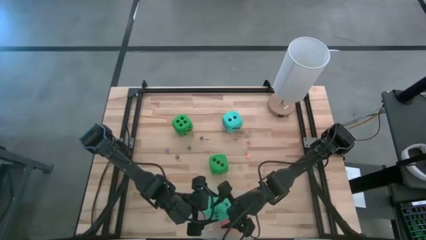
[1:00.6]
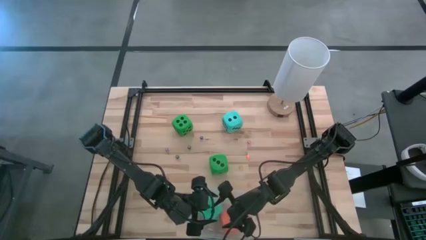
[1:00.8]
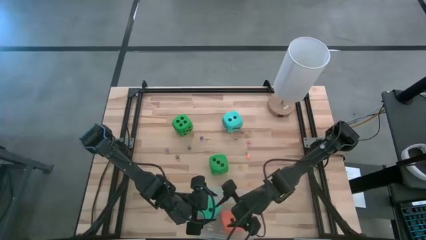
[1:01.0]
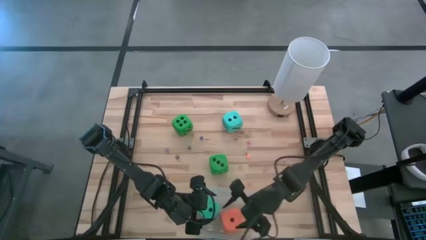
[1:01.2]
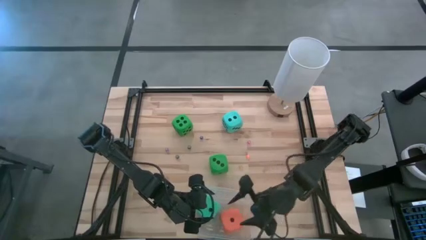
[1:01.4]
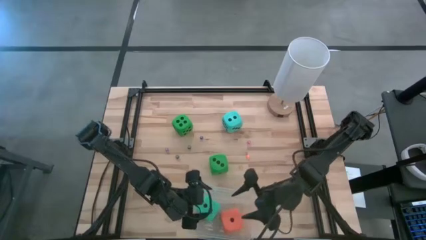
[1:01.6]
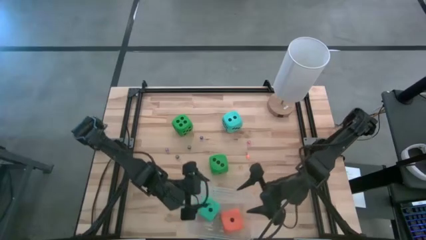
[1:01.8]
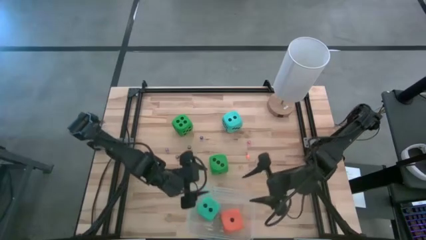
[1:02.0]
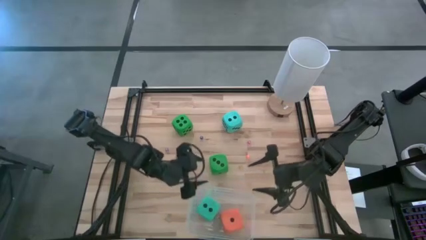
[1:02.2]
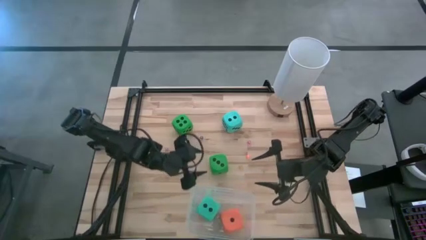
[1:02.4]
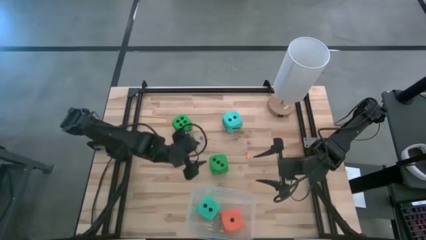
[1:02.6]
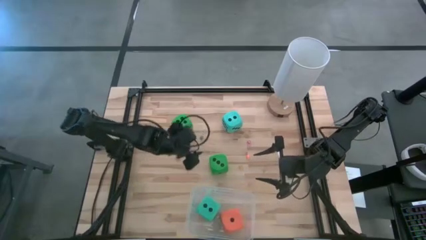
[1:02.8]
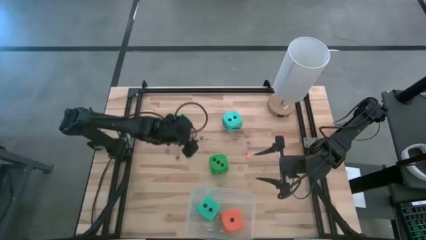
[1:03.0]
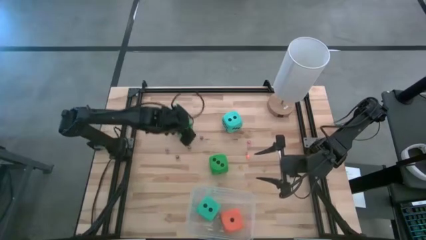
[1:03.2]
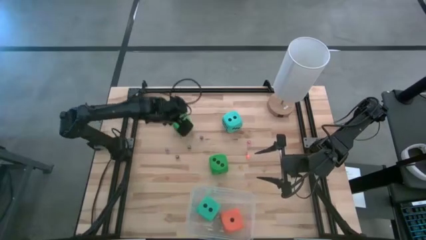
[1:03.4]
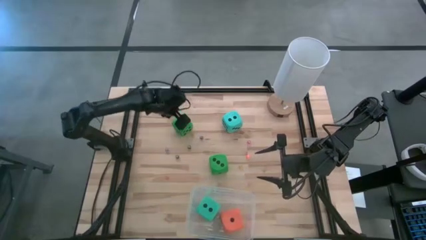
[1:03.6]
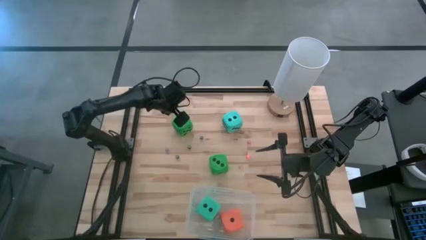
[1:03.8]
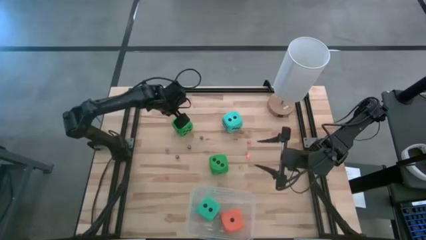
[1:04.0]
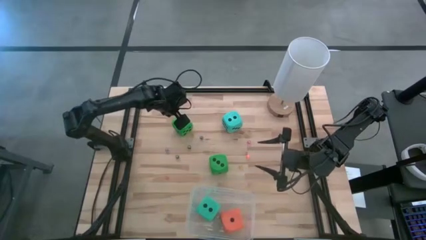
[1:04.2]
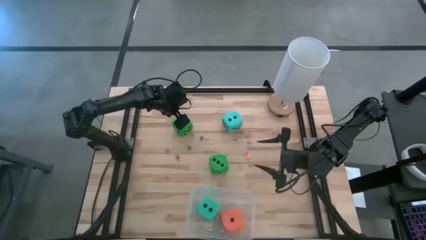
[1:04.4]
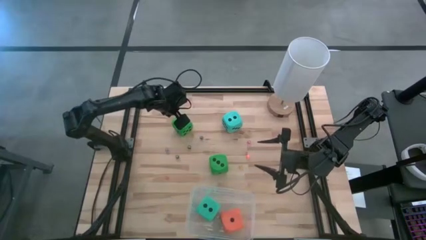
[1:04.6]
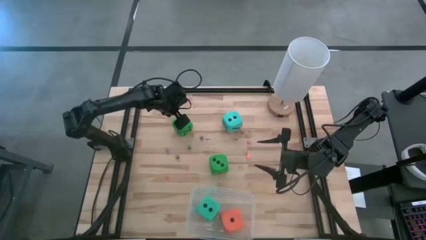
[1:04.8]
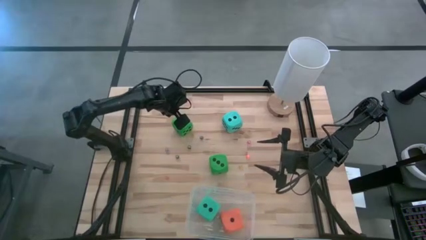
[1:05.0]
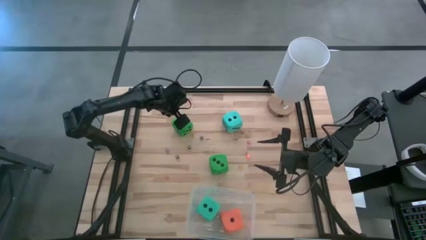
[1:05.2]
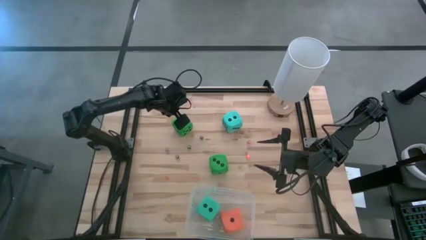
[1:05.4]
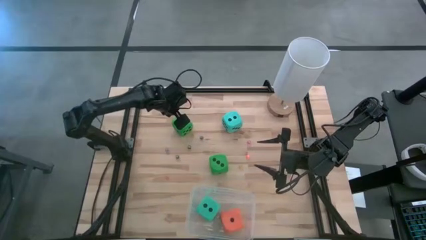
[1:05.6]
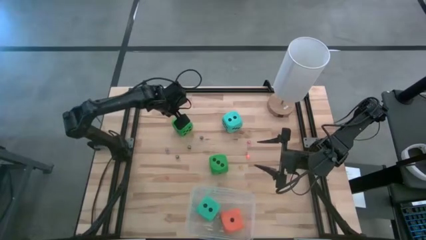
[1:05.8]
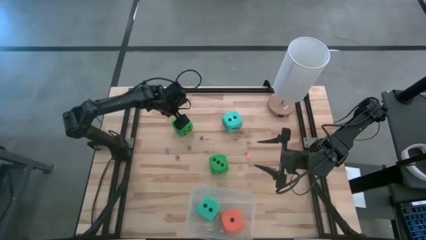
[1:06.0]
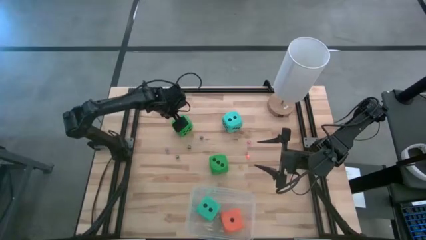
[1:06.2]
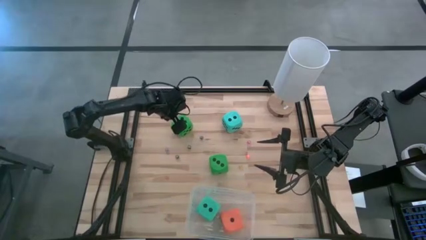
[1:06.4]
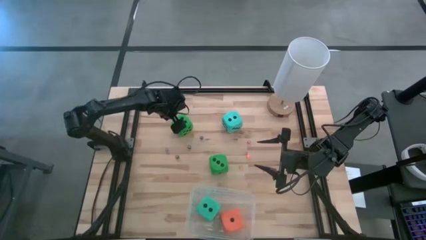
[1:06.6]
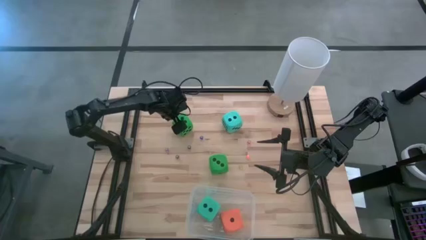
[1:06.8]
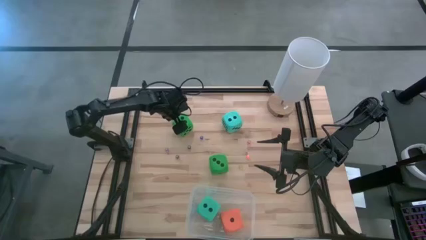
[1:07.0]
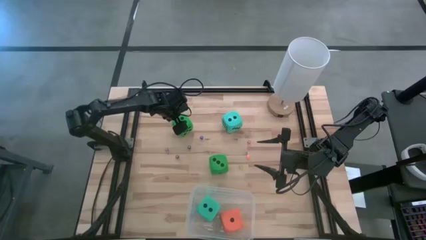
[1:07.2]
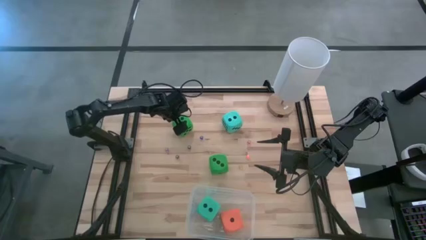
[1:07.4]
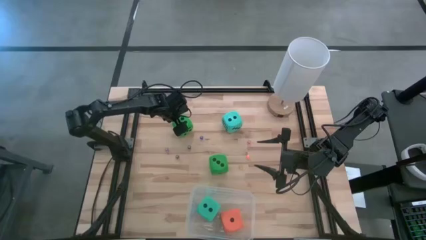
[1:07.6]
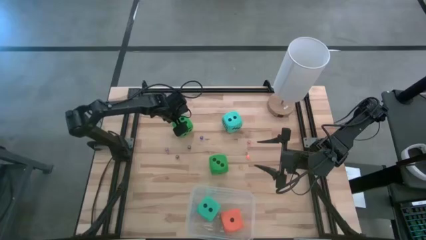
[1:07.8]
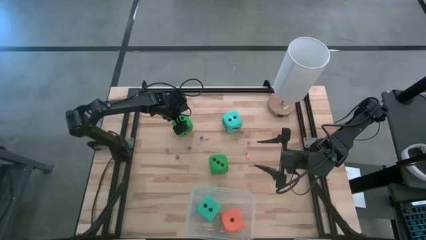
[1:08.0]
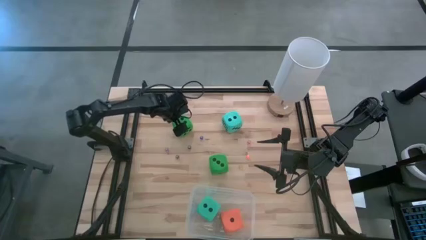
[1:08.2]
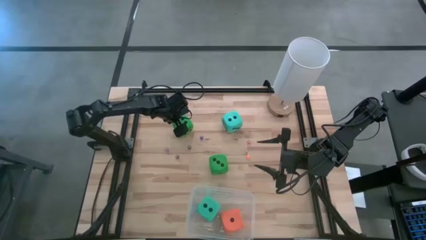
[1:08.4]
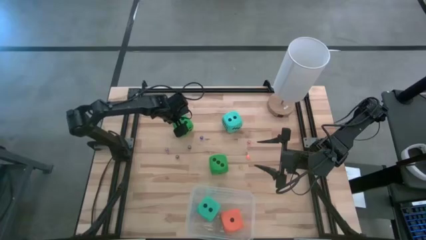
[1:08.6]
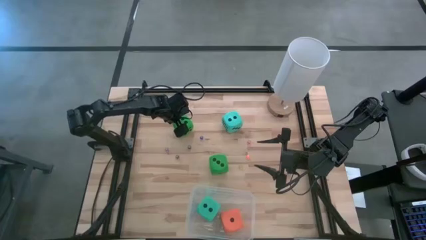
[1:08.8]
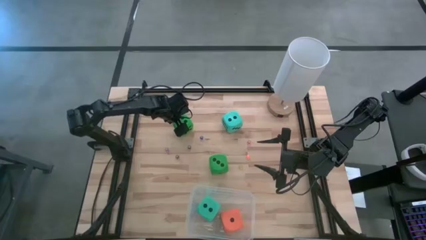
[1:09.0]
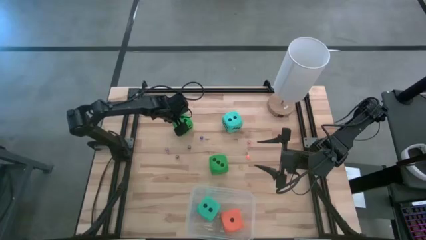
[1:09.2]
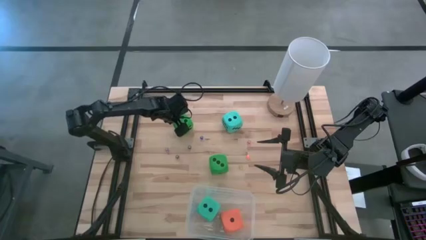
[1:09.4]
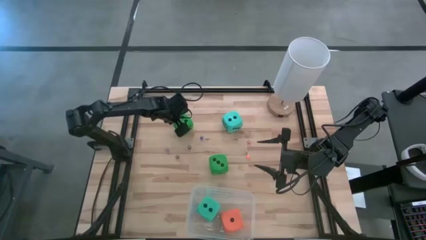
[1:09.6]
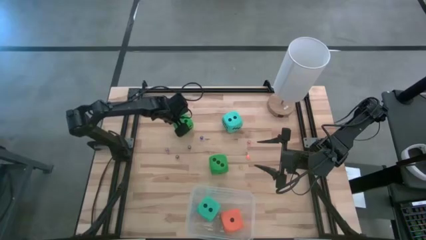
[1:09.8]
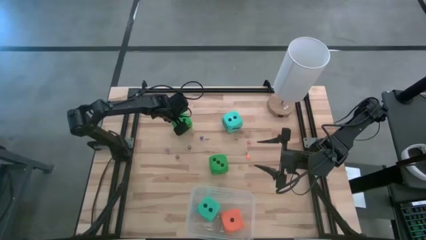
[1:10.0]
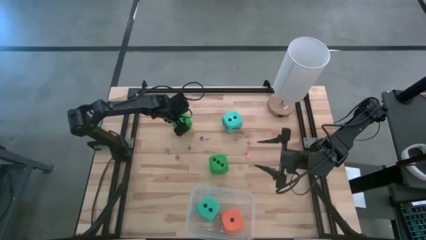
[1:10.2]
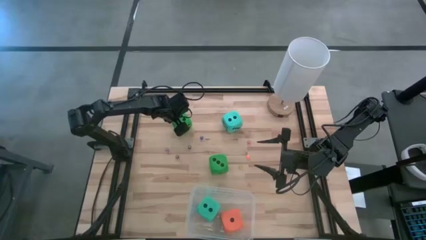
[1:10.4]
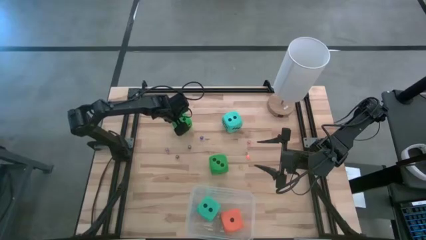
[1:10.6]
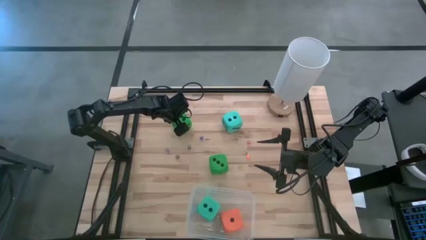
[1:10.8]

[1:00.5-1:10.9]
Task: Pick & Place Dice
Put the top large green dice into the transparent bin

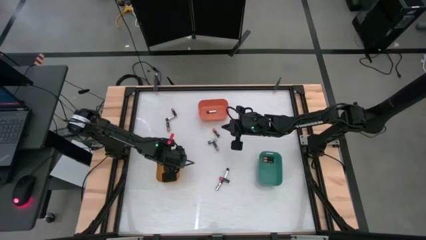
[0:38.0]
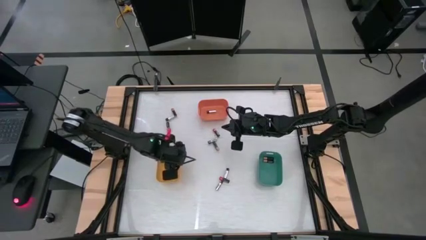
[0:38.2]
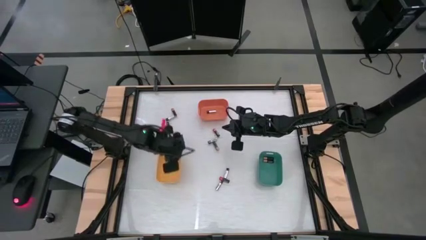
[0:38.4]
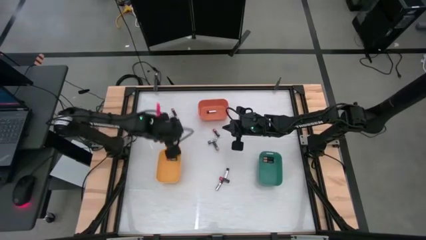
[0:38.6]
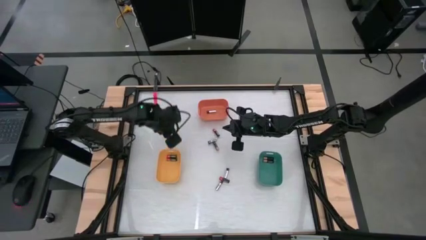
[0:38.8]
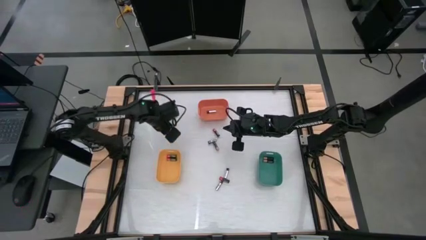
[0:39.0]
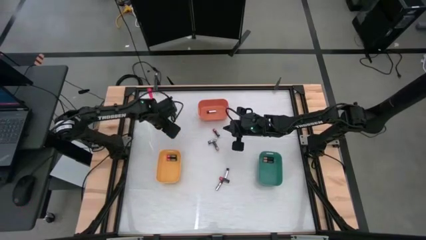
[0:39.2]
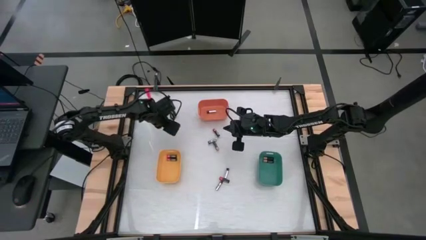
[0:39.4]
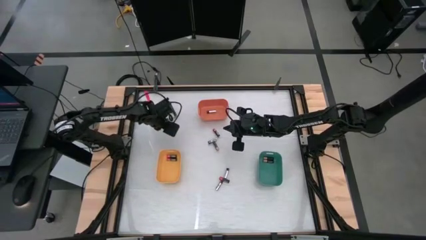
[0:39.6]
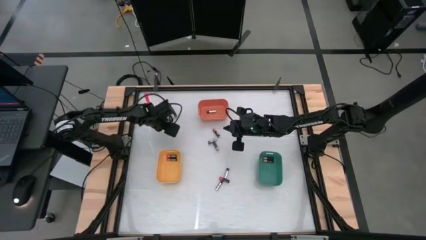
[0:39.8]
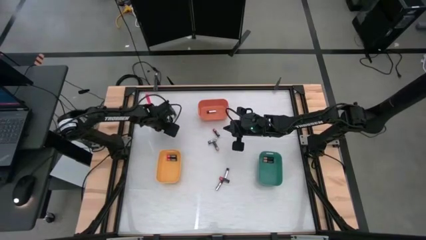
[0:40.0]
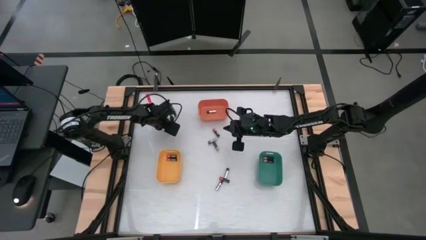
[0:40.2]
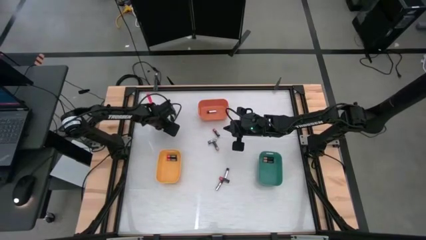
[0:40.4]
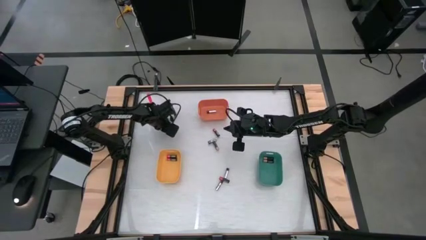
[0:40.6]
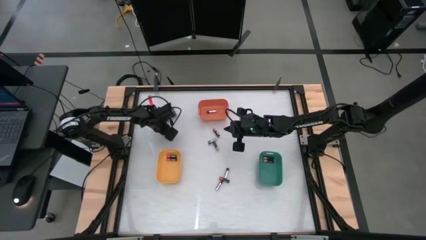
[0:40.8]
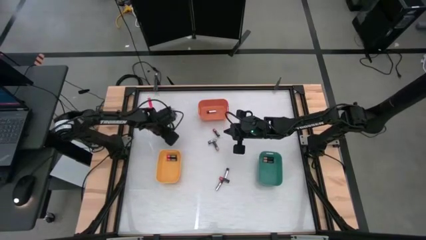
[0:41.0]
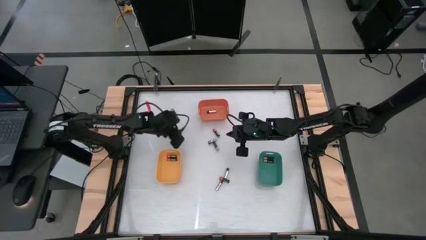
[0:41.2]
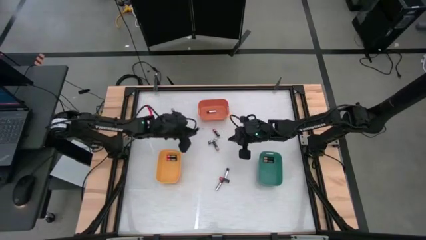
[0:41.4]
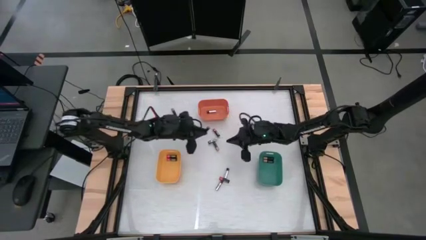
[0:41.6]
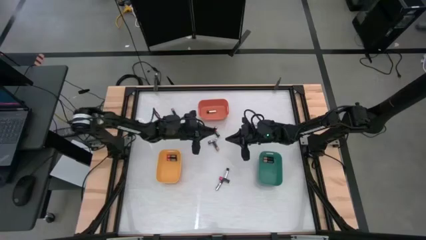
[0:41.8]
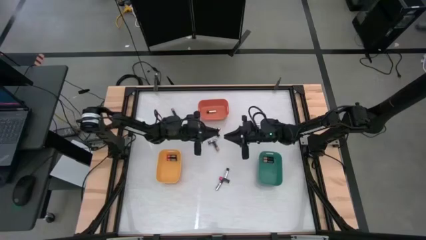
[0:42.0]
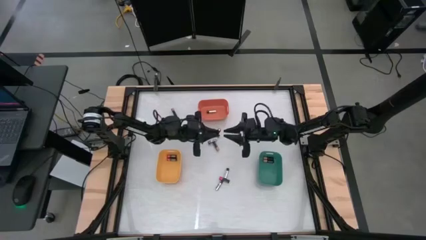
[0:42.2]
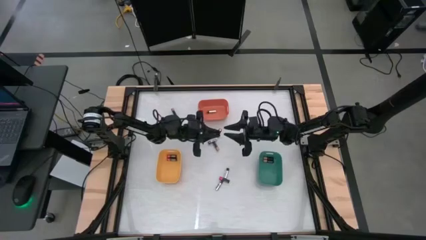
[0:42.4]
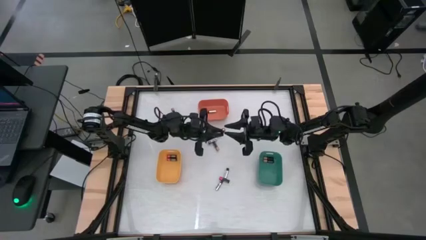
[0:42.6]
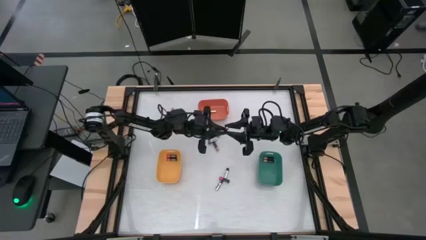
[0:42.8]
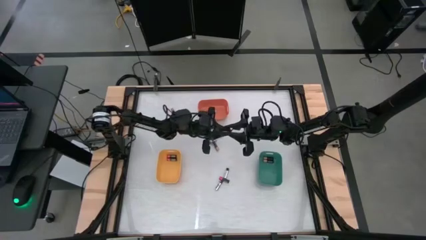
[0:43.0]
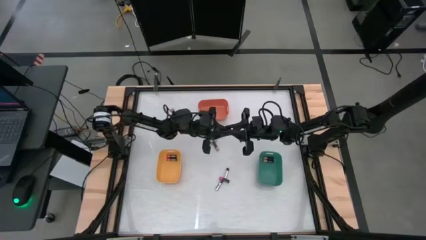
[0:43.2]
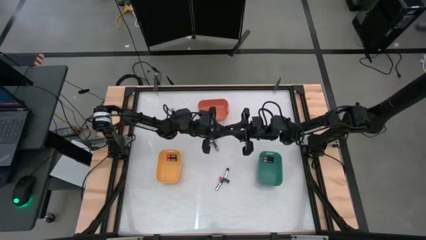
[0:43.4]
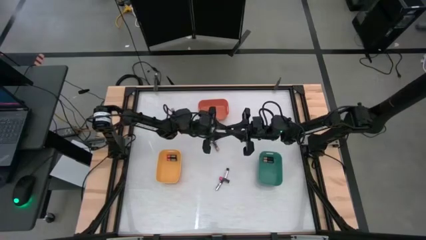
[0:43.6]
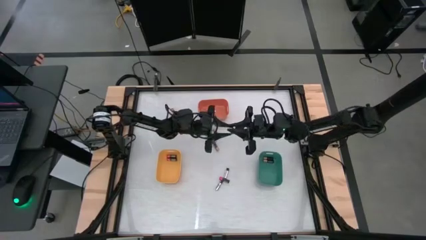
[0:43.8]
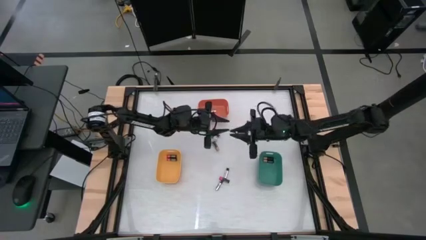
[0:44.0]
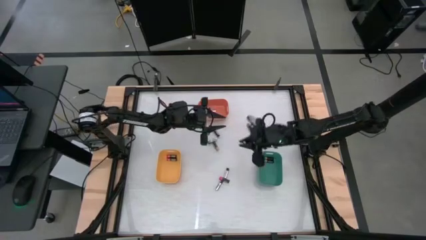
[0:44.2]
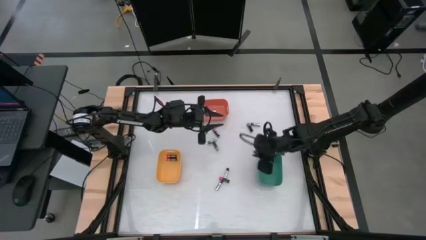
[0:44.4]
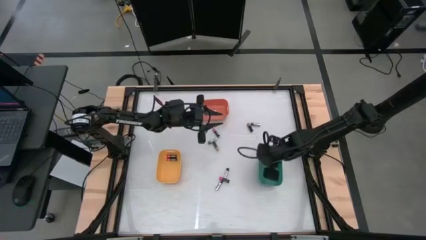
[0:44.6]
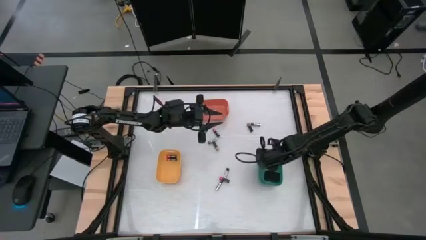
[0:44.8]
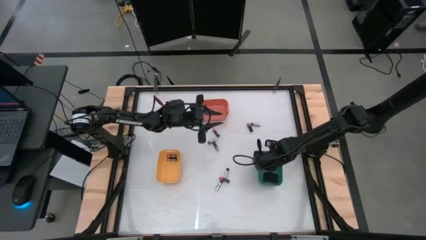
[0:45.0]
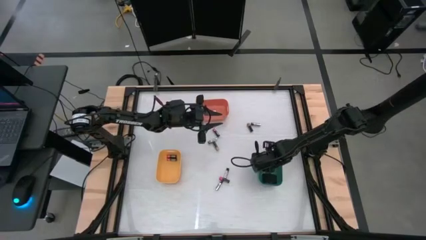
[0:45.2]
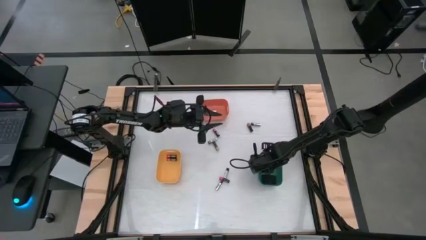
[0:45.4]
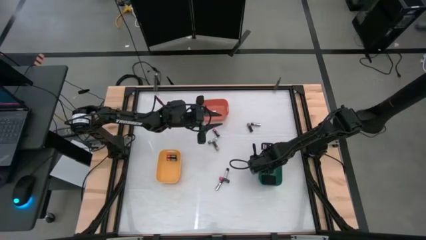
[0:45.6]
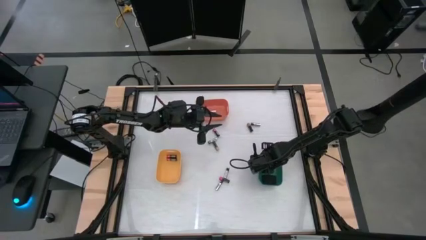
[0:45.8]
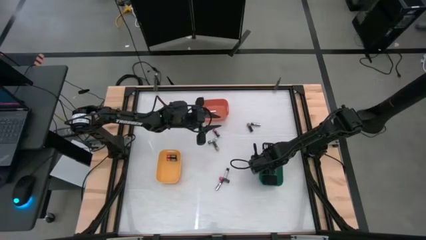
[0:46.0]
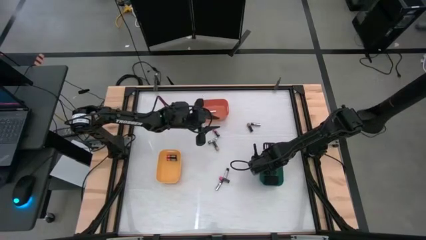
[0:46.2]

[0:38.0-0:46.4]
Task: Sort batteries
Put the brown battery into the green bin
